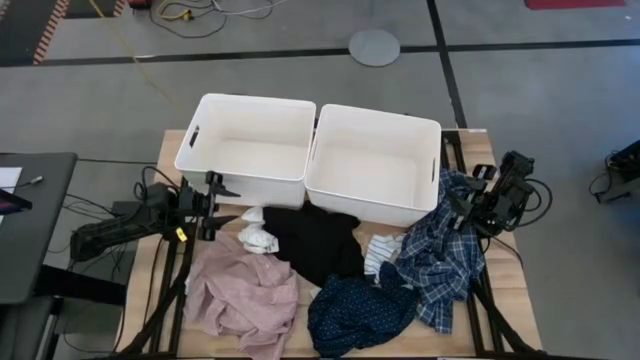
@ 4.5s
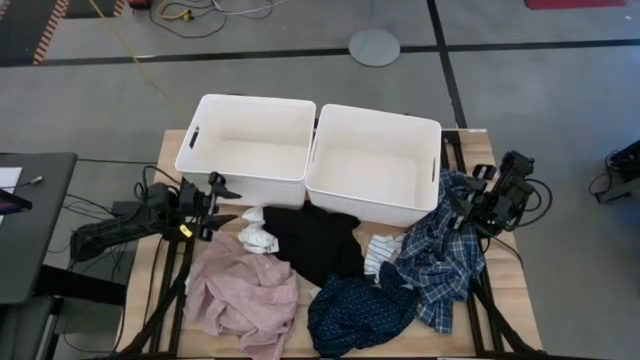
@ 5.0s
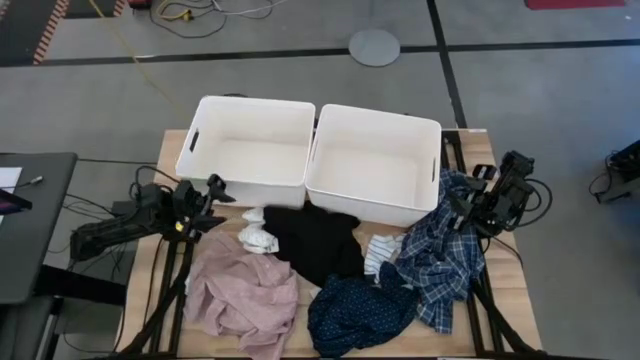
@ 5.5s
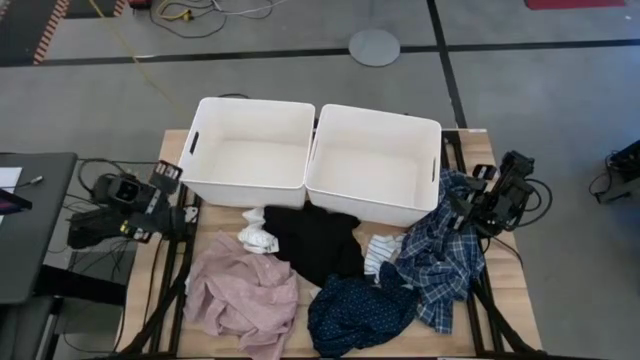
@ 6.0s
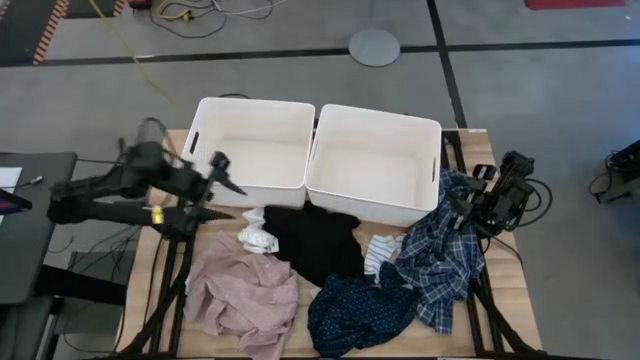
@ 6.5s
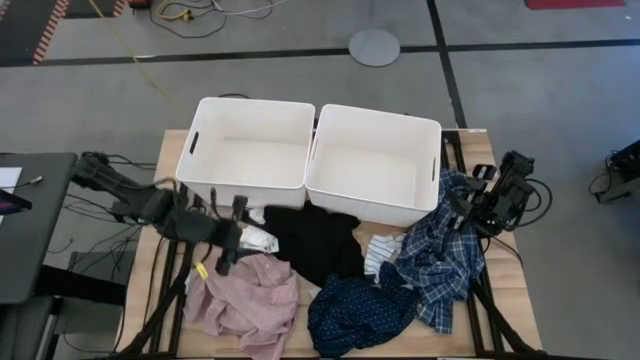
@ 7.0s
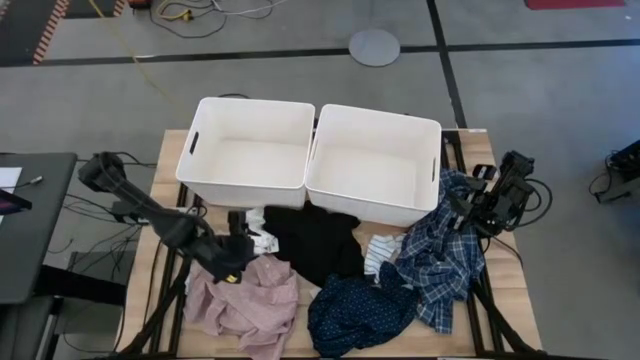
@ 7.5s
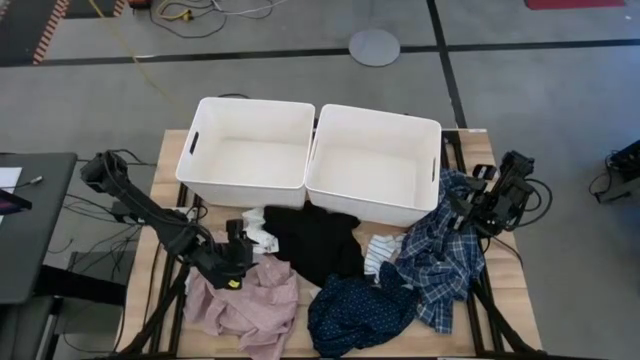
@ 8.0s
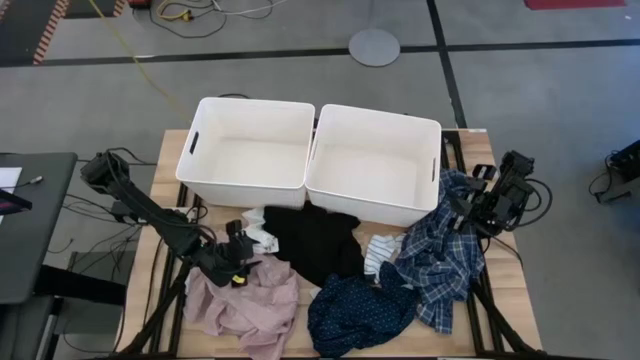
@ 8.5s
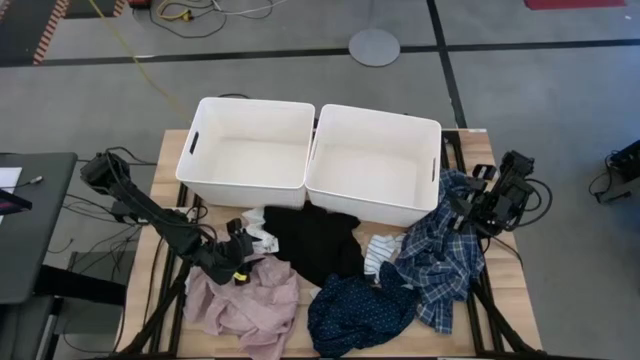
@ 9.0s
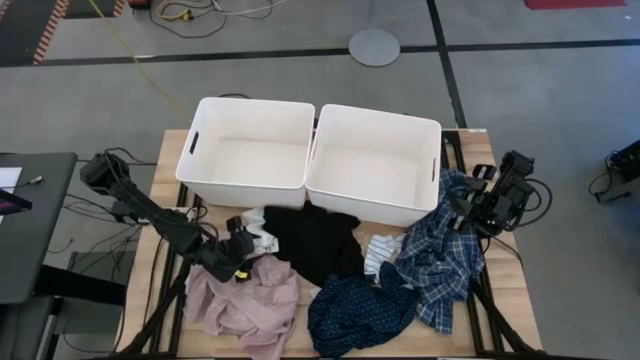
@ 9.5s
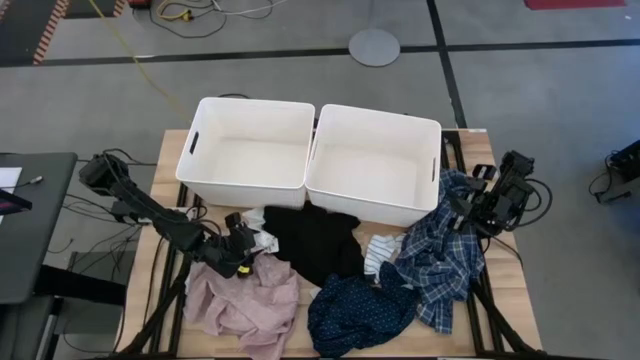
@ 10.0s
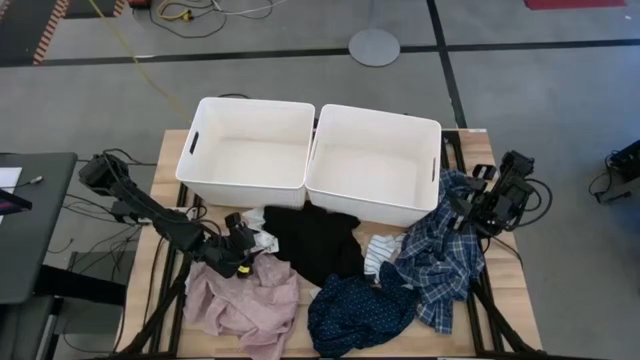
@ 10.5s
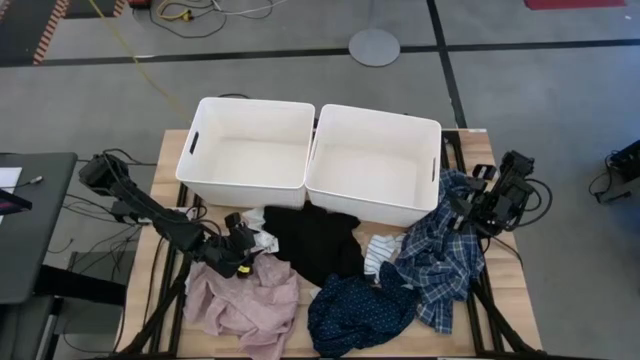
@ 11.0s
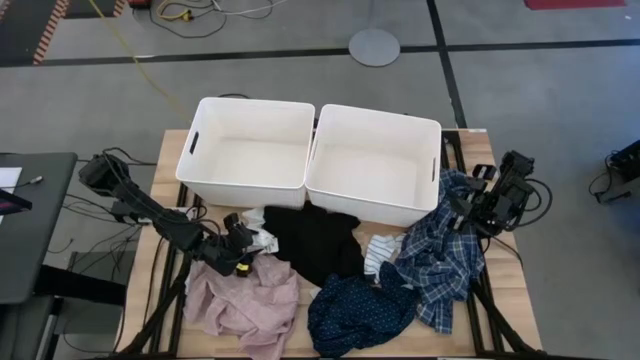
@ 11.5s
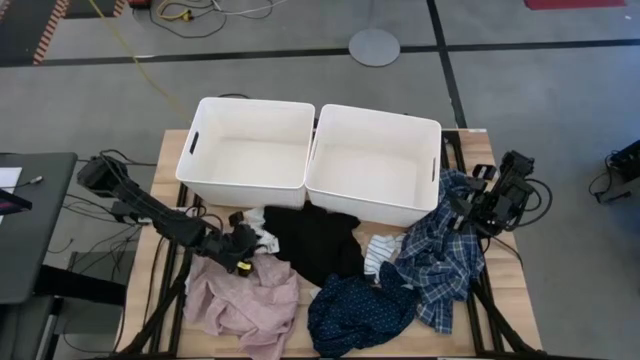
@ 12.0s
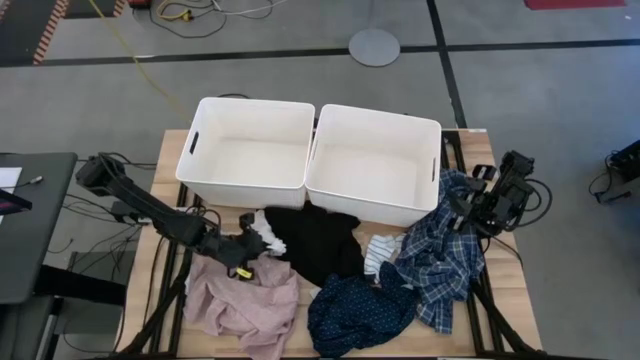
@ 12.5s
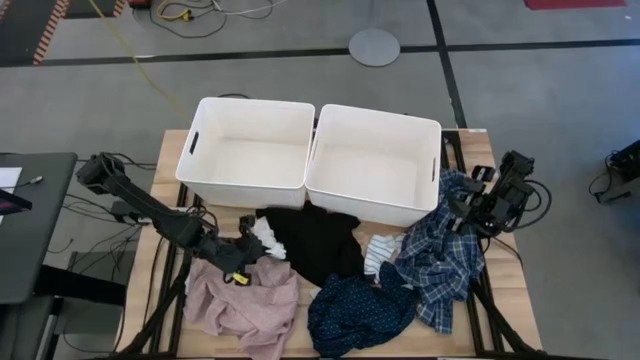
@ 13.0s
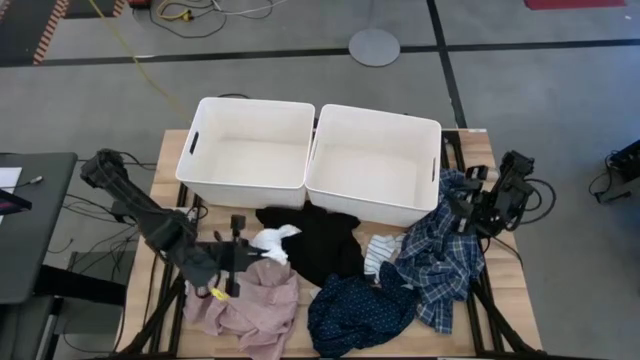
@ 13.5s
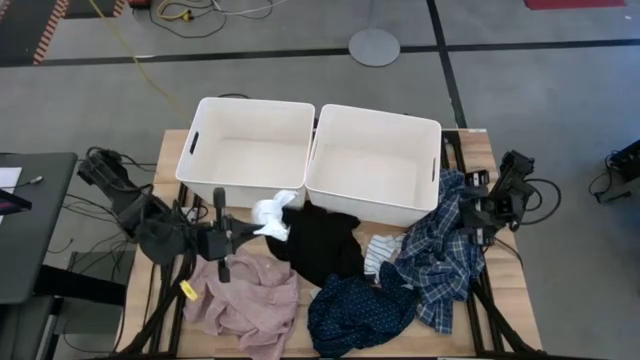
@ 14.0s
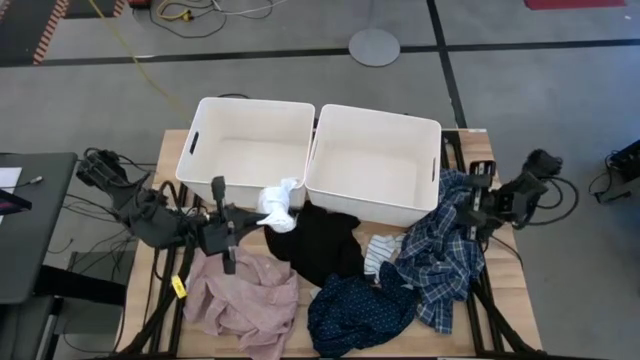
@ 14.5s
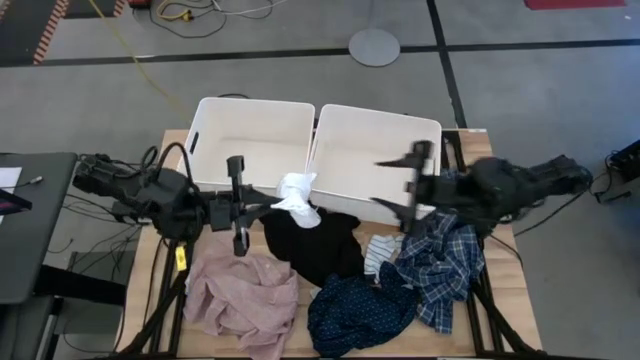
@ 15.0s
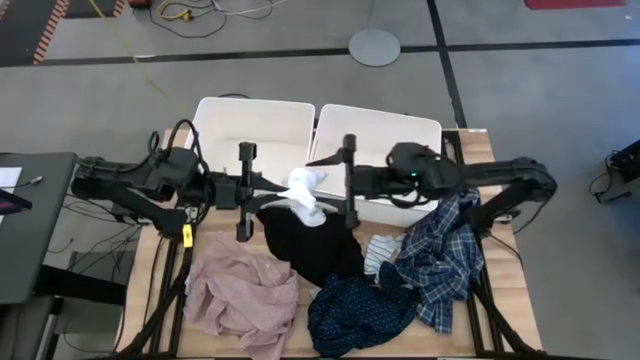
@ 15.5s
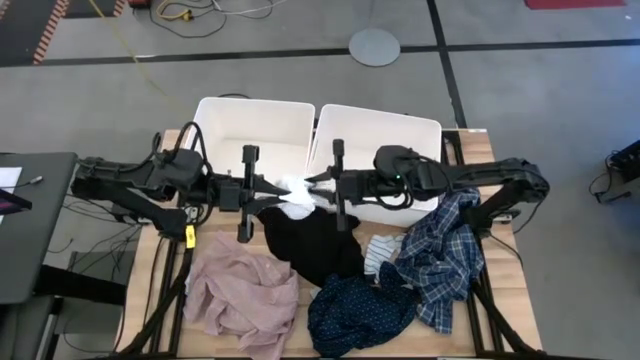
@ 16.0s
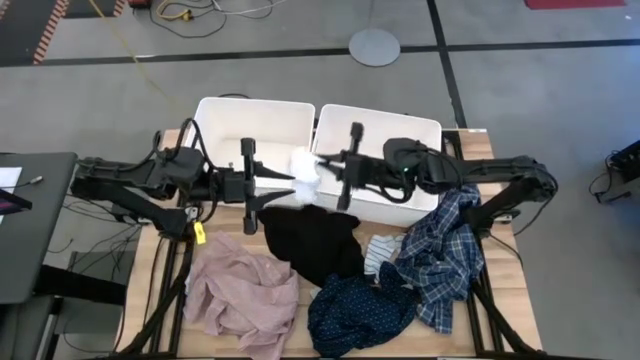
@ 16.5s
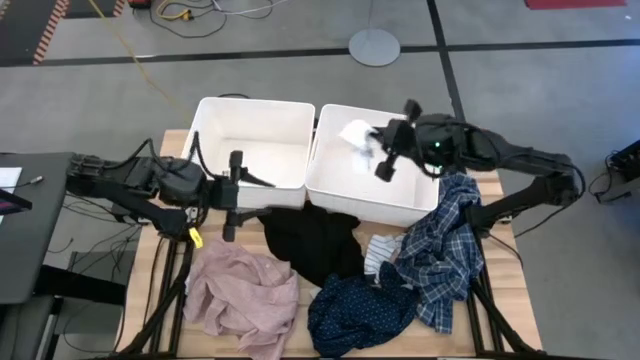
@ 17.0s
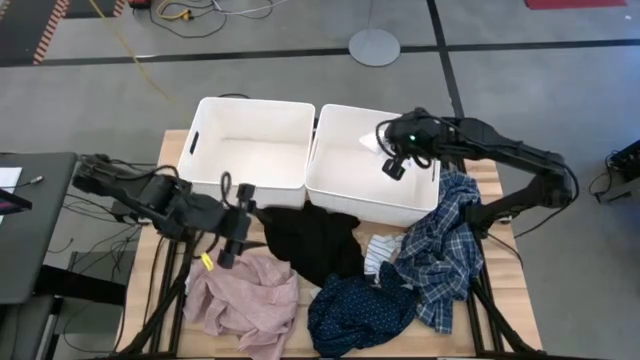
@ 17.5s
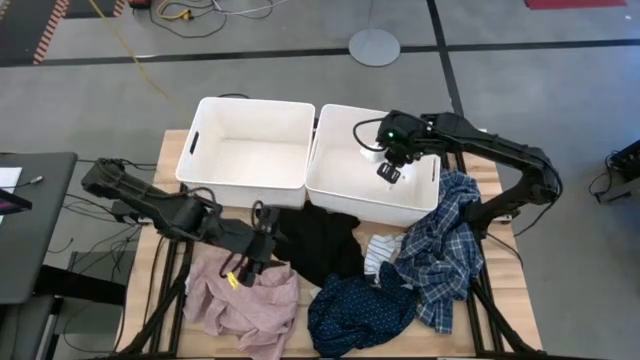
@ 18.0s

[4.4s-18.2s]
Task: Sort clothes
Put the white socks into the right white laundry bin

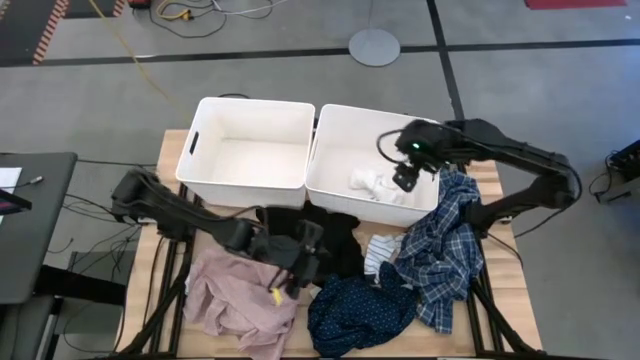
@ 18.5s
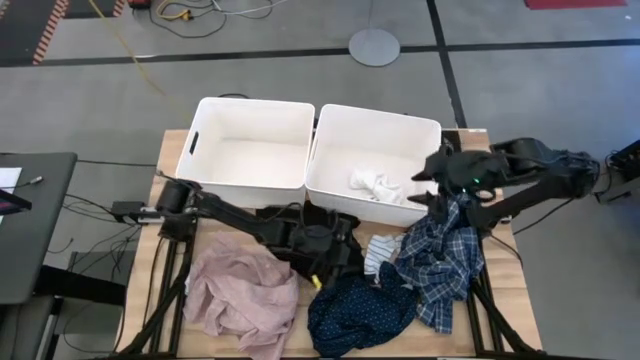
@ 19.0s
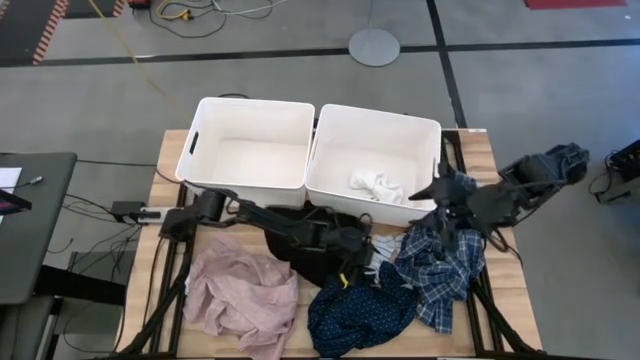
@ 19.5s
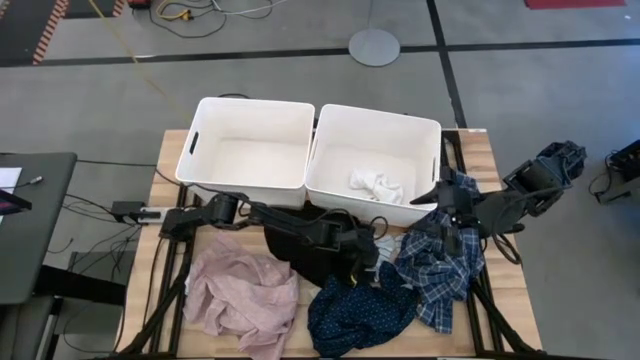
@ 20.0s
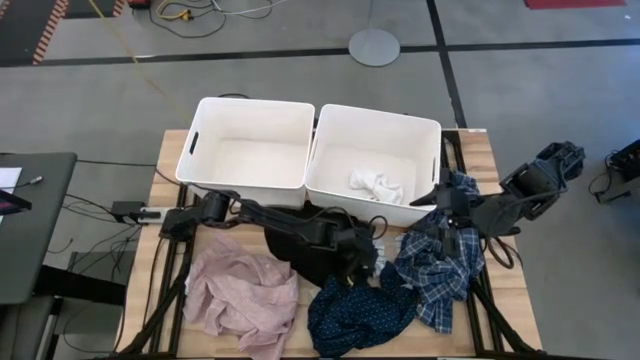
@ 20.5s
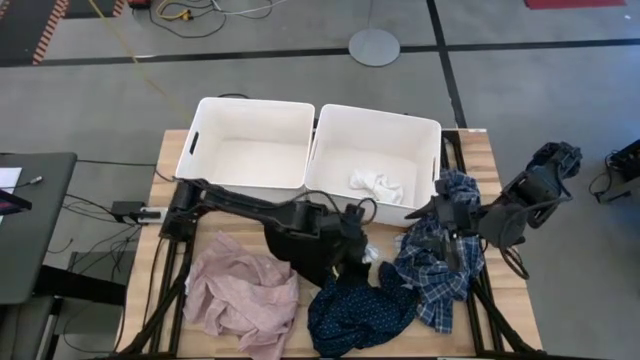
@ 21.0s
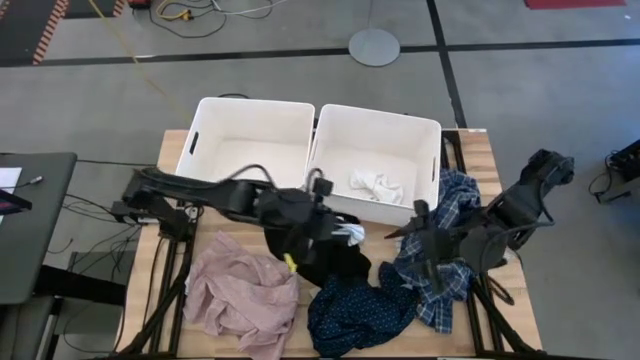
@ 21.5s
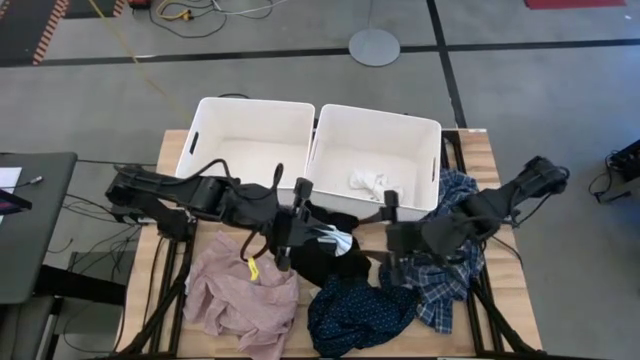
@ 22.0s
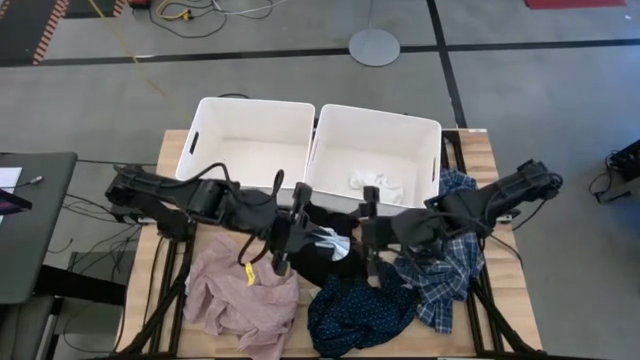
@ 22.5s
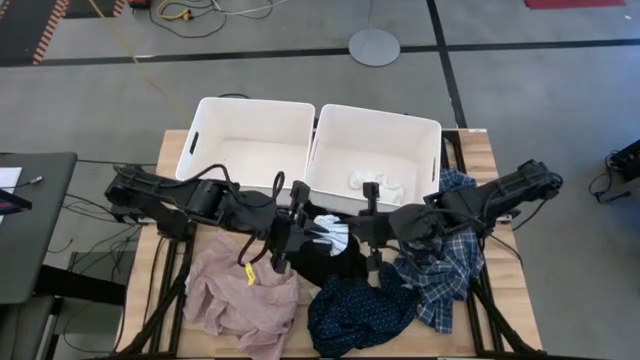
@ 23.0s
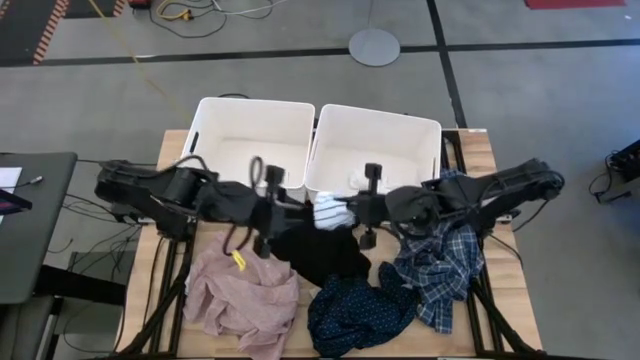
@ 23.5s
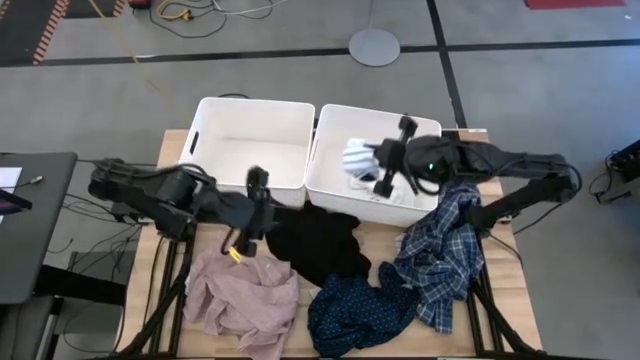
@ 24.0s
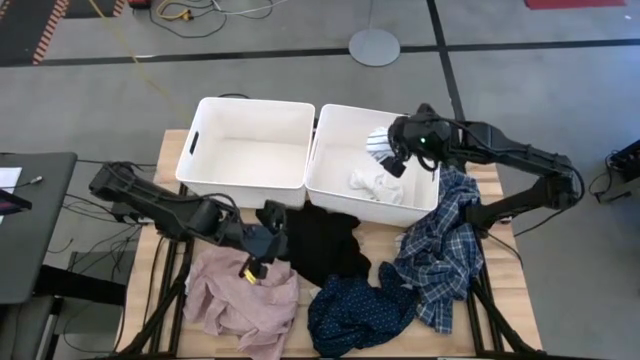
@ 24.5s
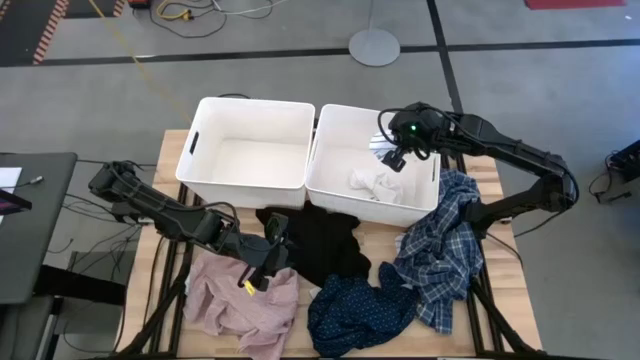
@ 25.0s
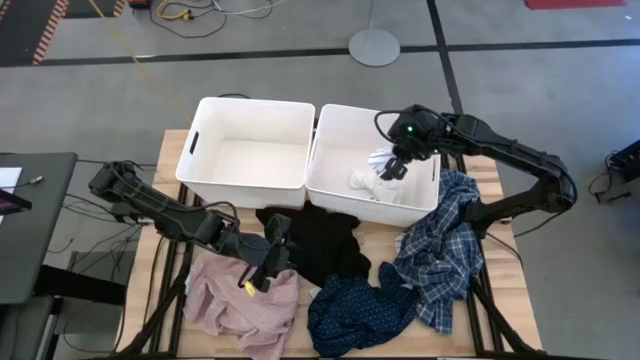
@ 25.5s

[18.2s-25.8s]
Put the left white patterned sock into the right white laundry bin

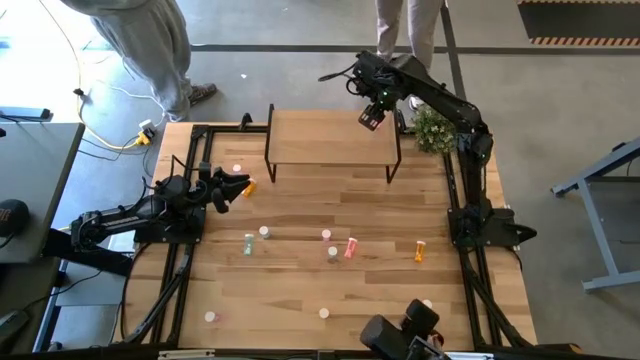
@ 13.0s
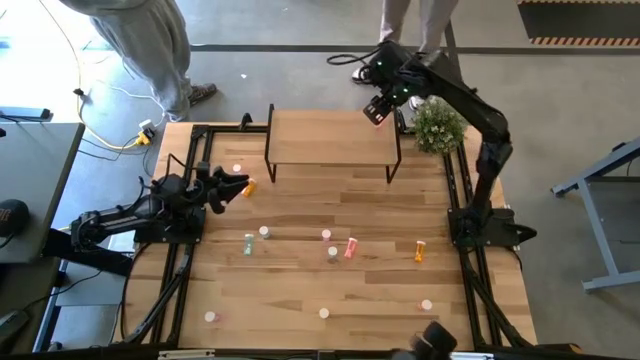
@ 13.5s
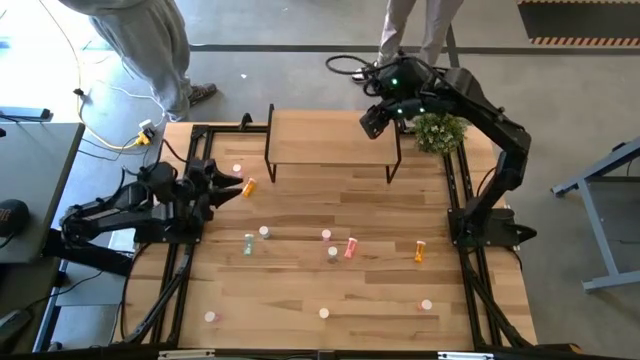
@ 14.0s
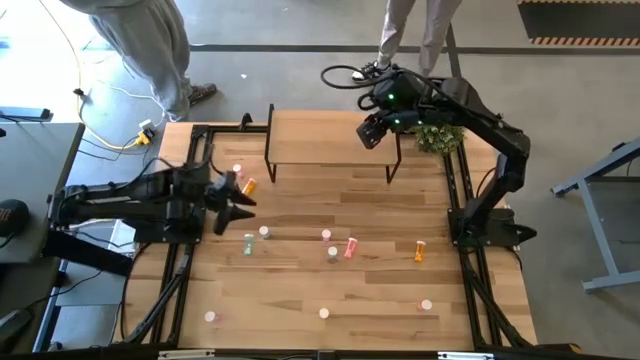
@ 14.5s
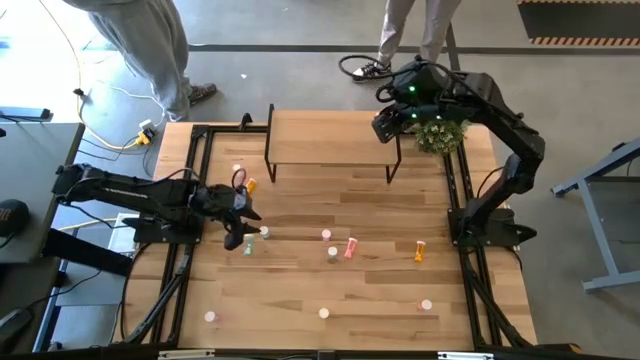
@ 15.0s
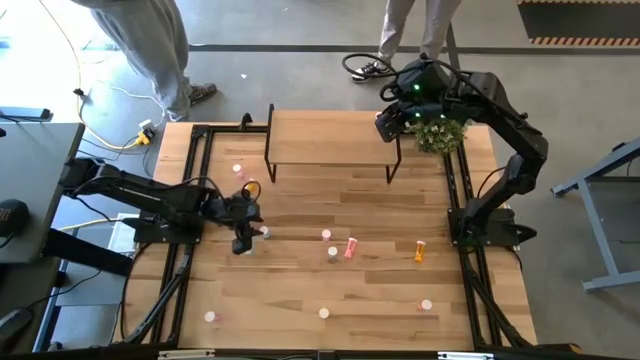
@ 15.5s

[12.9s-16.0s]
Task: Pick and place medicine bottles onto shelf by color
Put the top right blue pill bottle on the shelf
